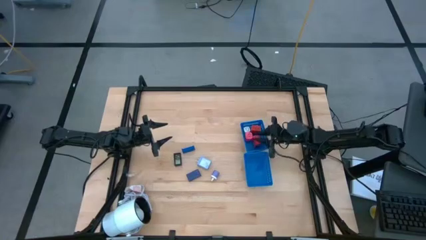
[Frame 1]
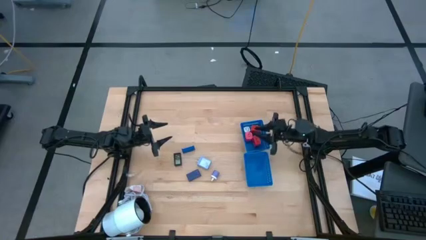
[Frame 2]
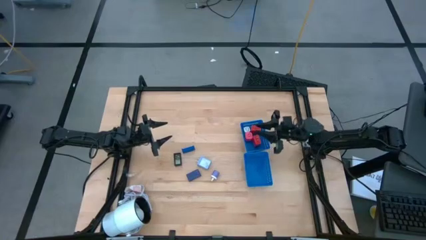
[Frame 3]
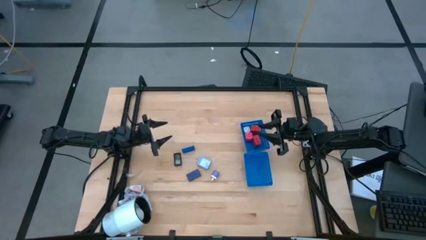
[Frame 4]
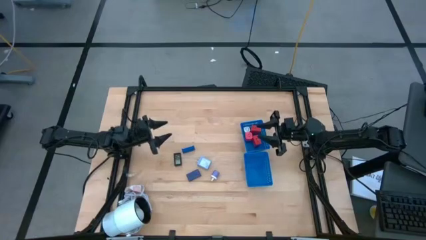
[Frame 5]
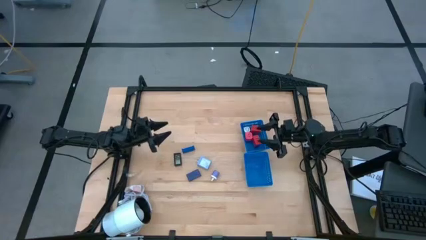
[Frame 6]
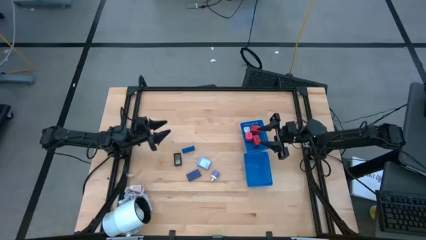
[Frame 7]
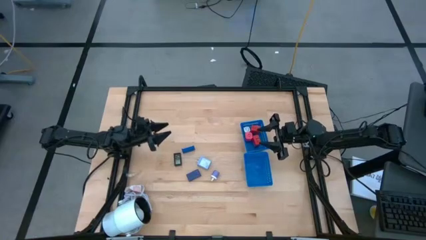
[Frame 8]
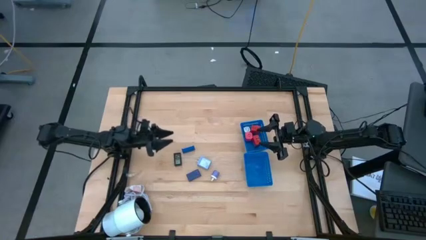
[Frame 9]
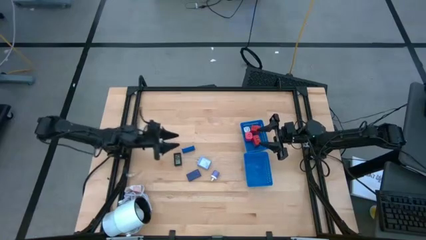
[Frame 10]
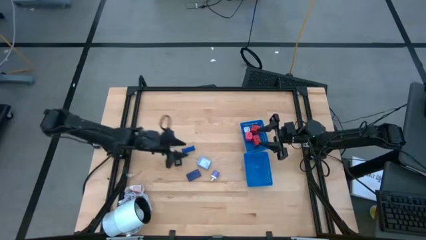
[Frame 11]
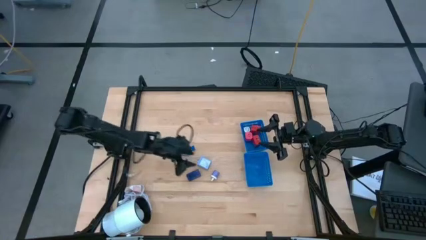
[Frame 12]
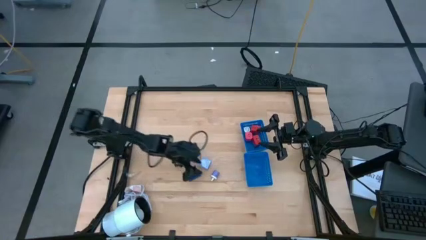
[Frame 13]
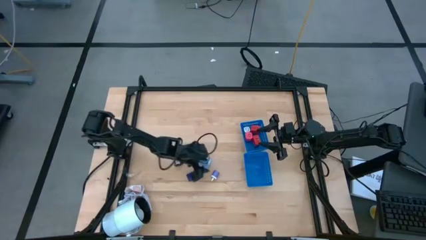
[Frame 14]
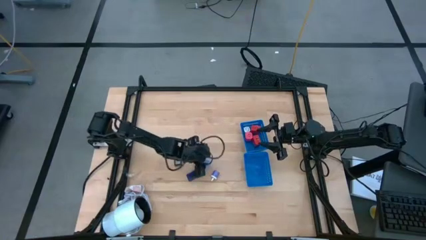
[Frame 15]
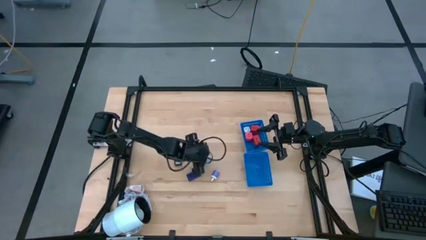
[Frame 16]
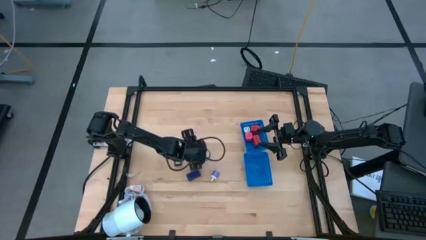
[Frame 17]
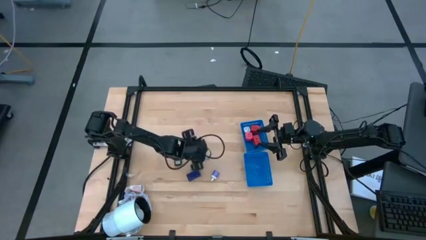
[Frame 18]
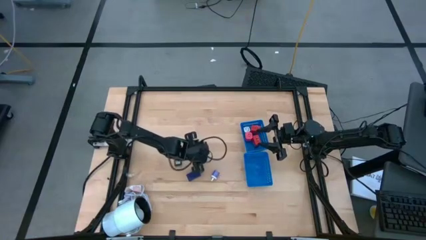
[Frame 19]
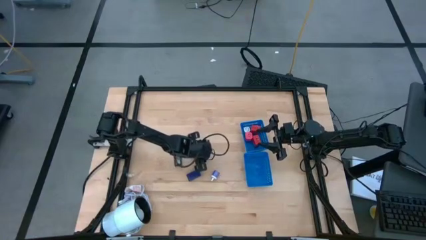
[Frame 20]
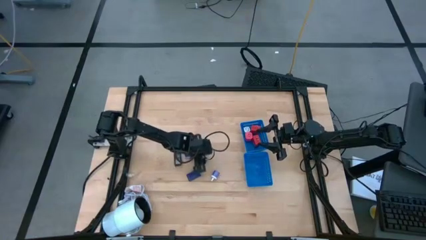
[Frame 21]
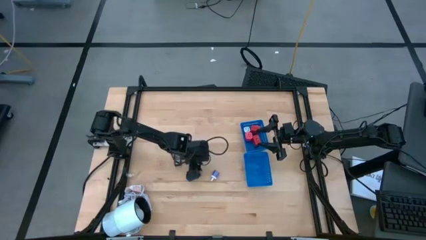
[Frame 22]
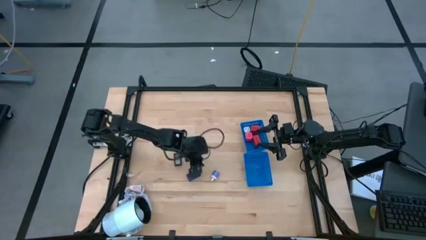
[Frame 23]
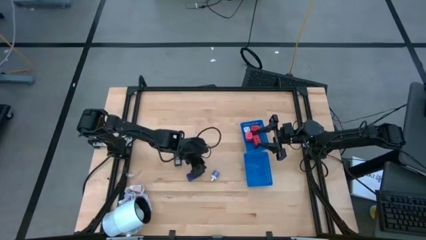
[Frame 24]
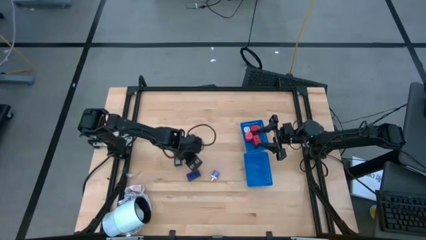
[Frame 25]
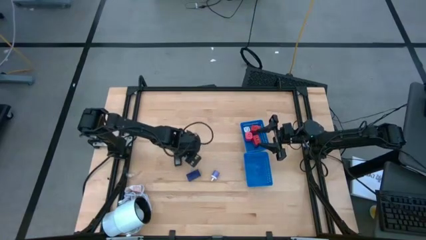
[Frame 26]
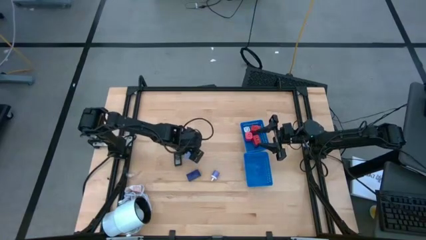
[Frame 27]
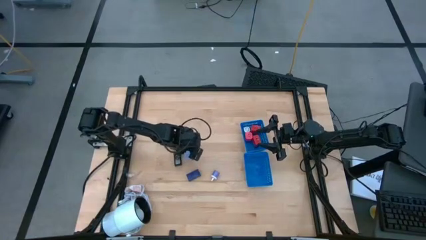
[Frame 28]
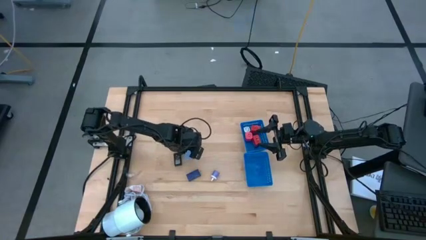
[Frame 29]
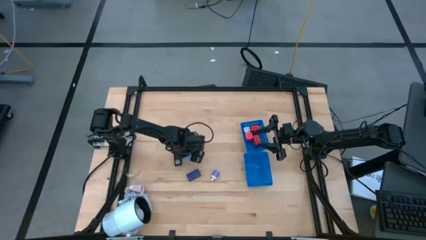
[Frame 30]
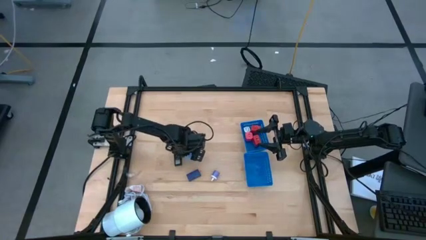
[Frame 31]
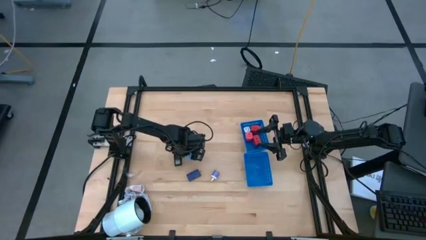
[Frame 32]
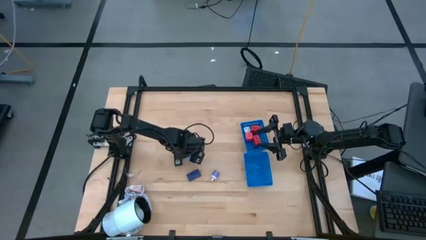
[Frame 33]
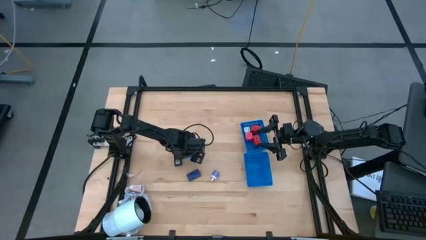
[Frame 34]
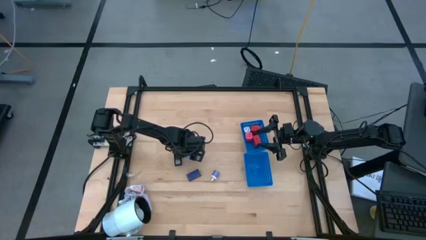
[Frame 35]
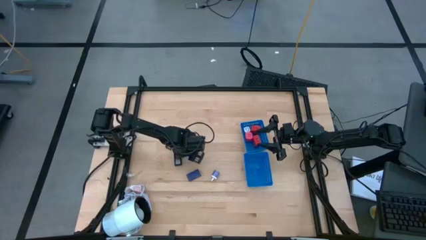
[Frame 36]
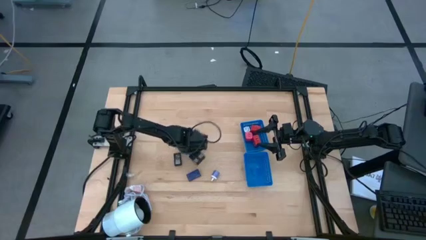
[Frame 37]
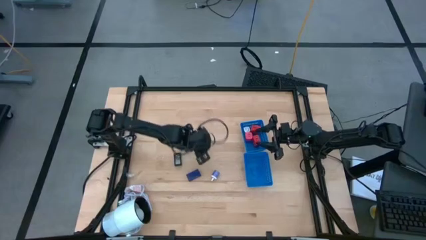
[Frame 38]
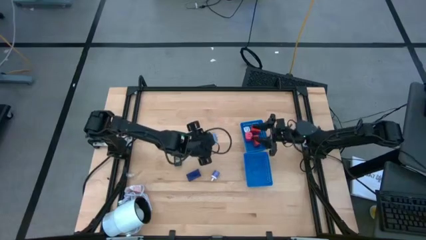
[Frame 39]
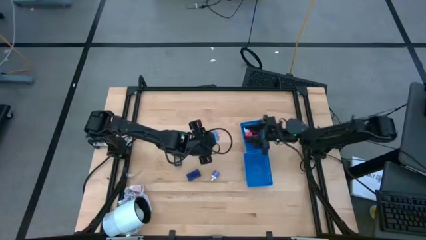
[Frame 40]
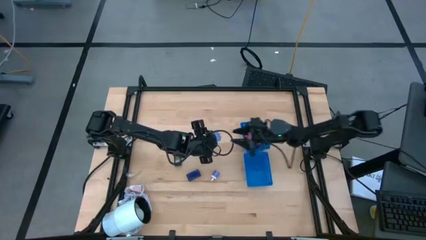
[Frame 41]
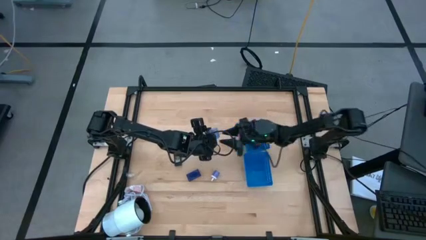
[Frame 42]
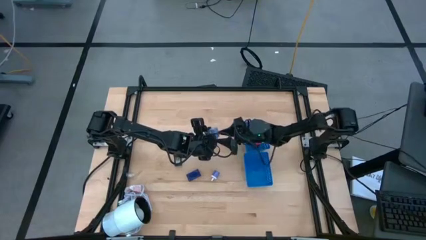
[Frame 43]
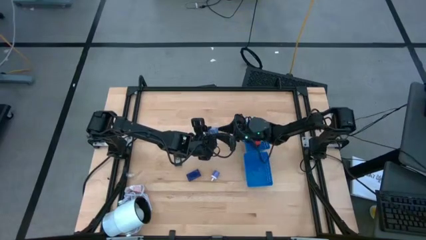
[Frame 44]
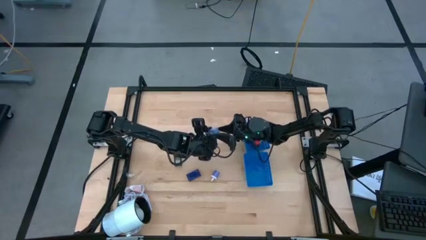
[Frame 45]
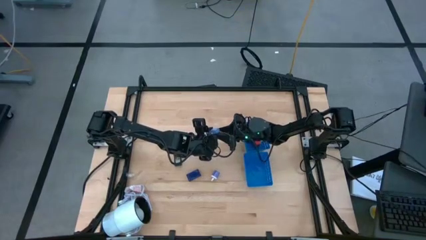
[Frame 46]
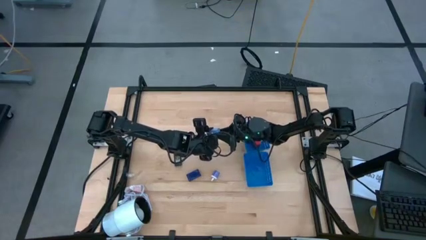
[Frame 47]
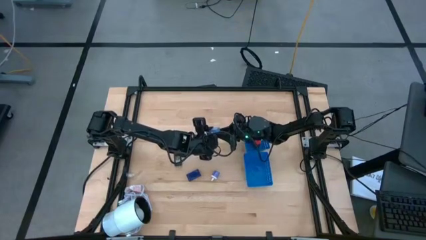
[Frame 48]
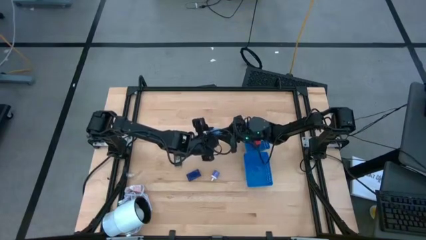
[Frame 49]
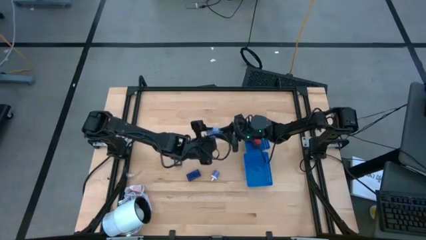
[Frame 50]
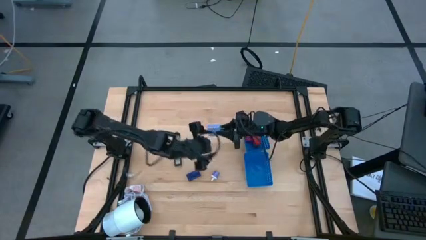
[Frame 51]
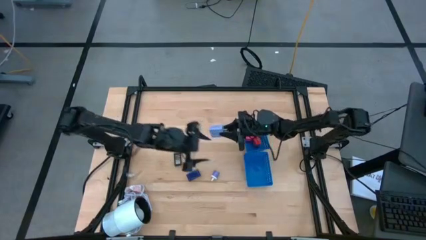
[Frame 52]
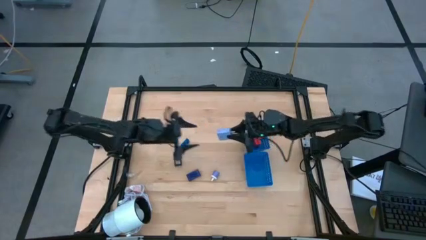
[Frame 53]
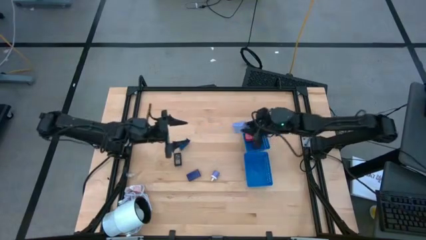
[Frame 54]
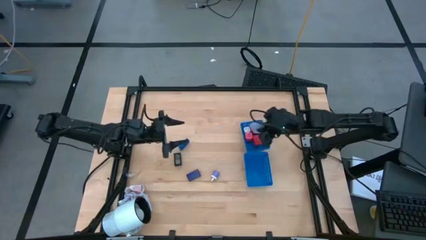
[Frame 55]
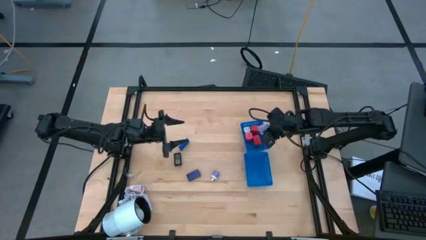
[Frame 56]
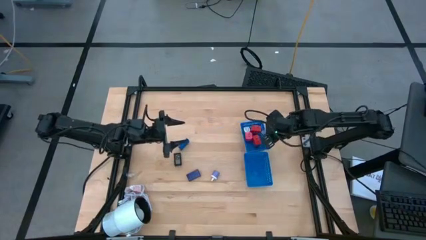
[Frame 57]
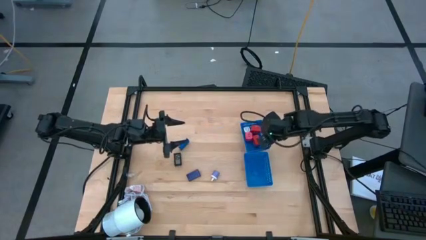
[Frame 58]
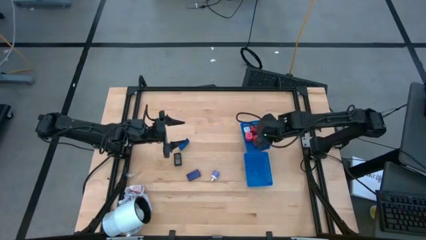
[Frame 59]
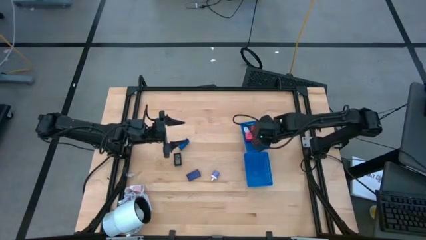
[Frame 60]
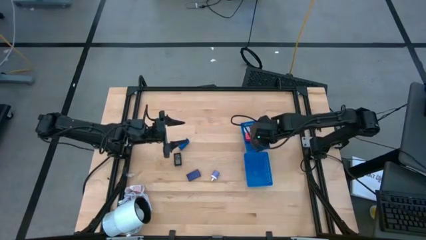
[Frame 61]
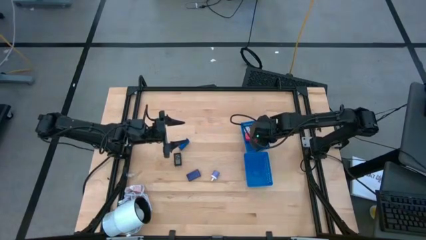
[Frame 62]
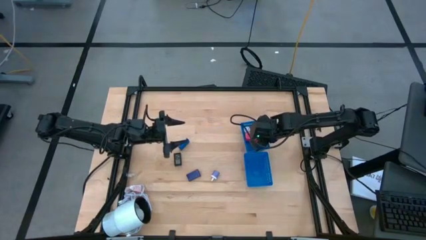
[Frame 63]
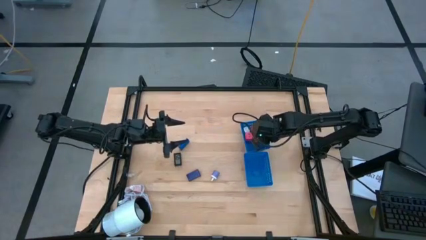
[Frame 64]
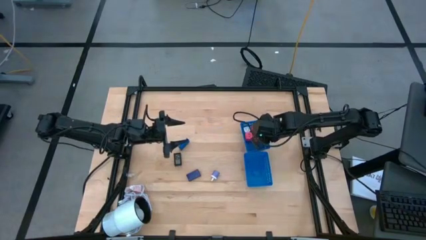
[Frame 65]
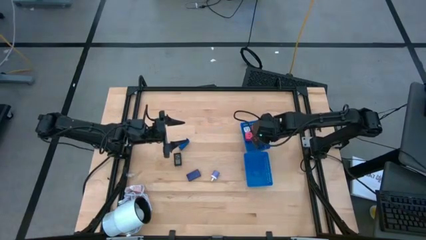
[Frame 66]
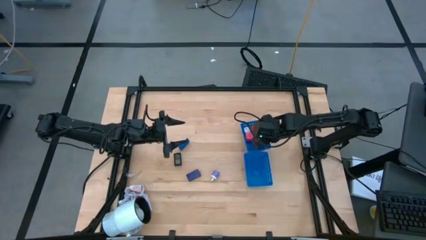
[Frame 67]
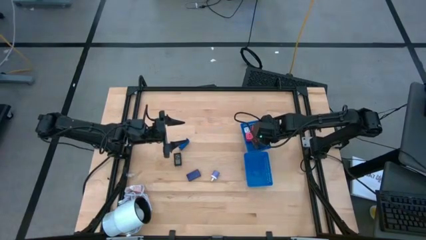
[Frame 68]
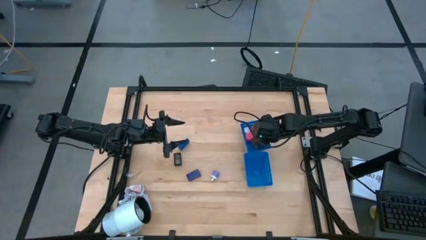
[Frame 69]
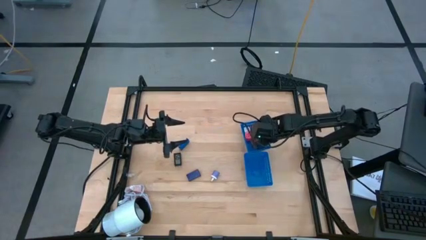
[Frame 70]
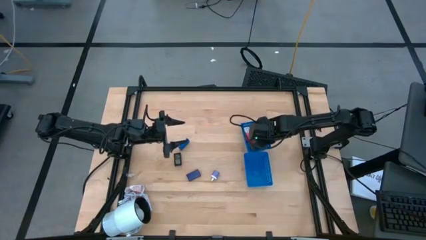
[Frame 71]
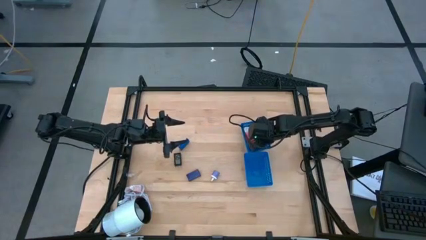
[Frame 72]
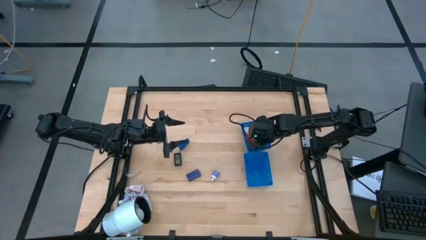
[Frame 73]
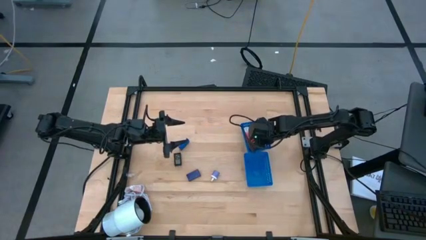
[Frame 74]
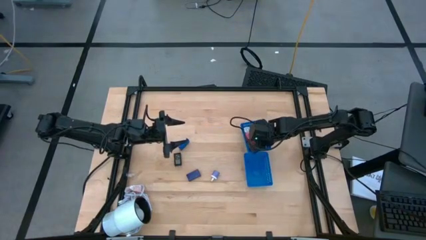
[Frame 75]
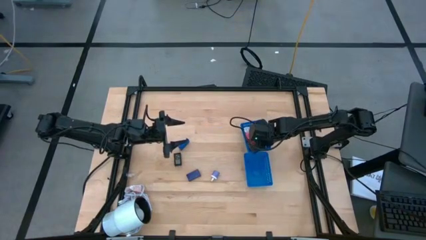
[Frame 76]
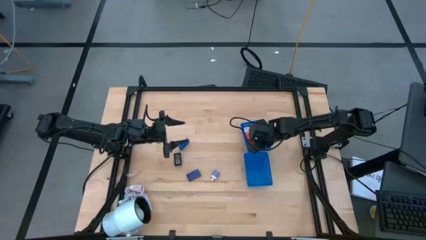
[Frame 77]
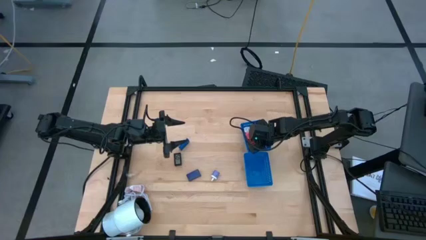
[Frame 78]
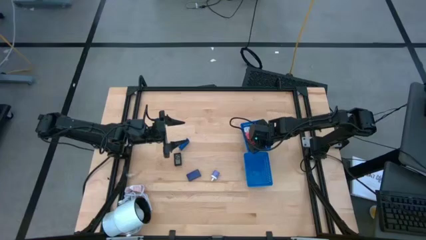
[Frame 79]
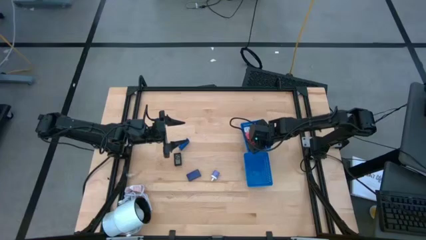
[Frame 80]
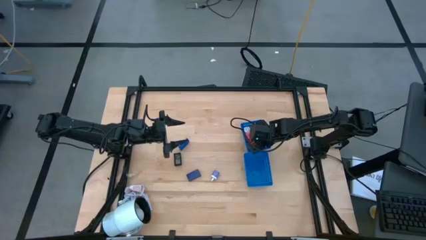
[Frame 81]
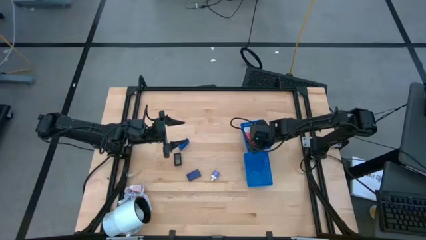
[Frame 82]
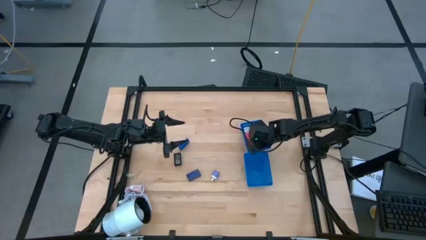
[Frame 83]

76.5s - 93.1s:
Task: Pick & Place Office items
Put the blue charger adapter into the top blue bin
